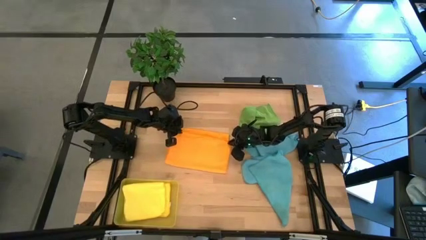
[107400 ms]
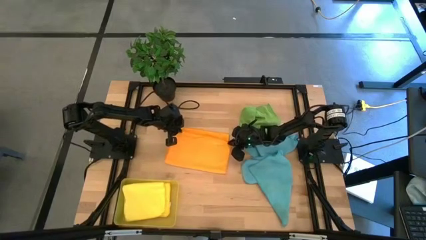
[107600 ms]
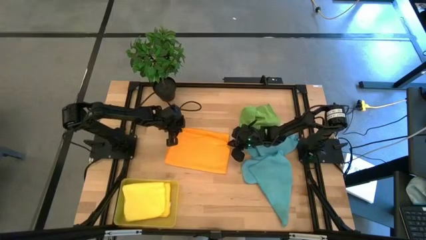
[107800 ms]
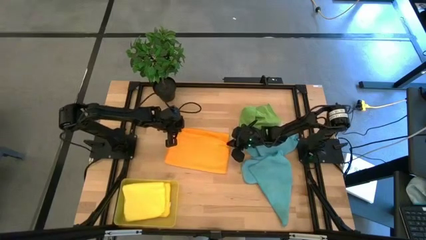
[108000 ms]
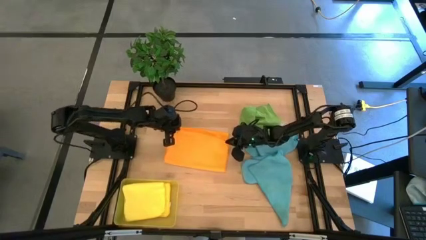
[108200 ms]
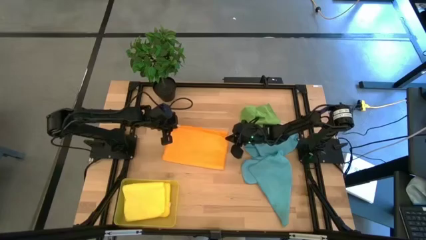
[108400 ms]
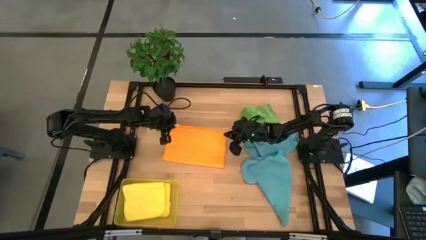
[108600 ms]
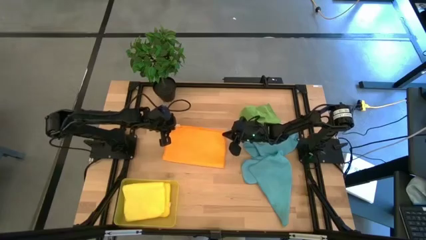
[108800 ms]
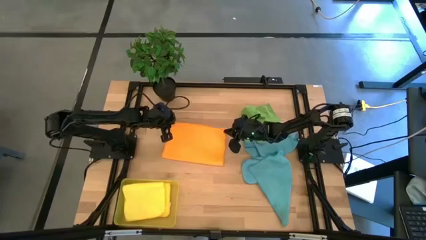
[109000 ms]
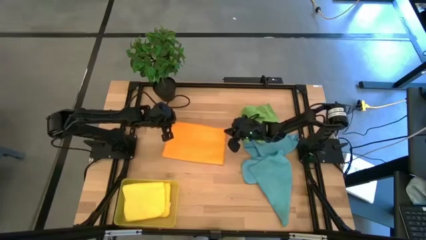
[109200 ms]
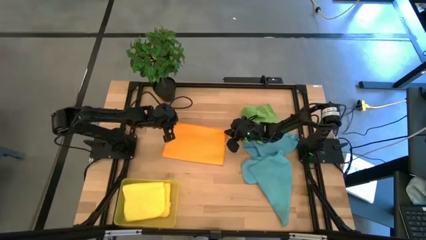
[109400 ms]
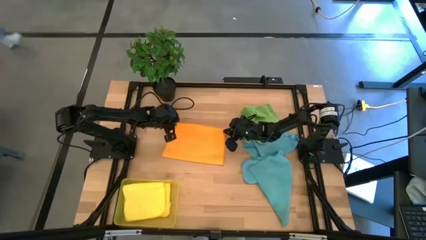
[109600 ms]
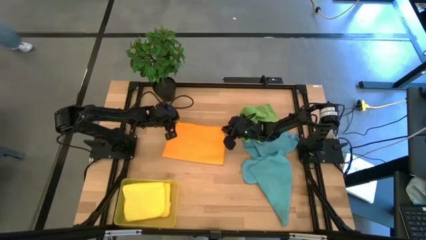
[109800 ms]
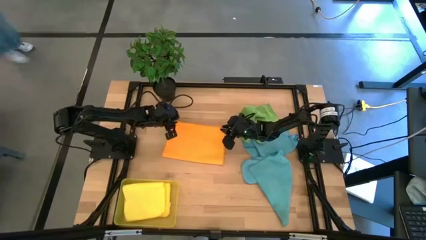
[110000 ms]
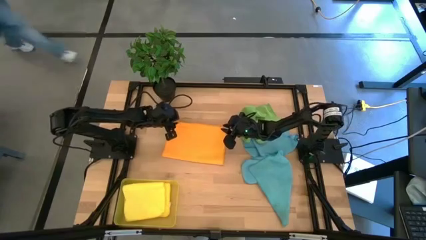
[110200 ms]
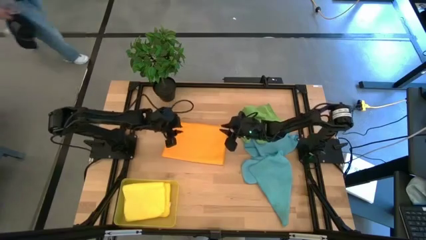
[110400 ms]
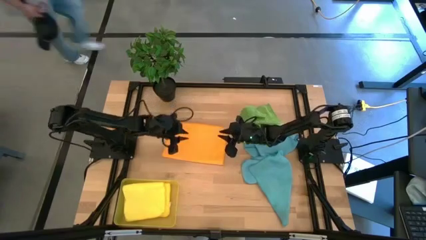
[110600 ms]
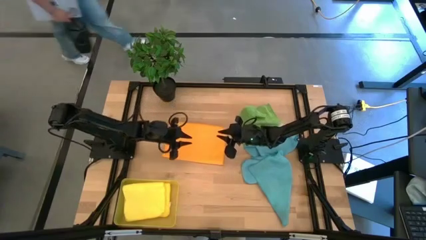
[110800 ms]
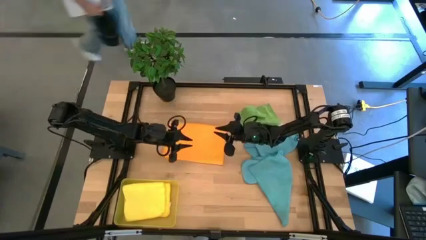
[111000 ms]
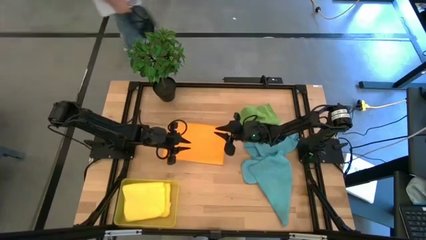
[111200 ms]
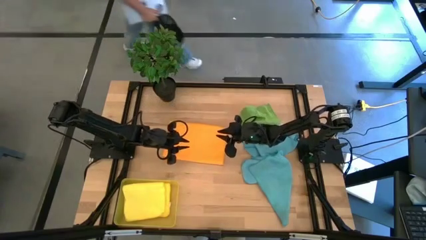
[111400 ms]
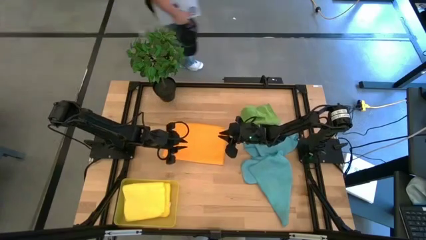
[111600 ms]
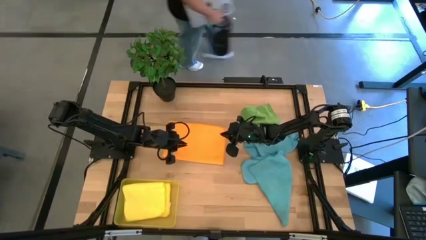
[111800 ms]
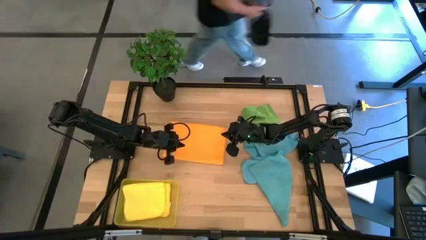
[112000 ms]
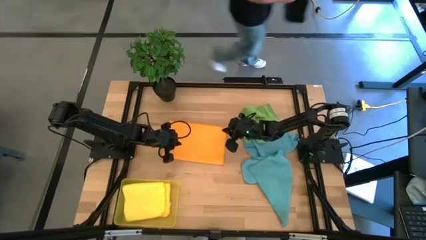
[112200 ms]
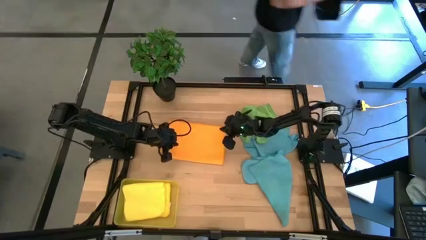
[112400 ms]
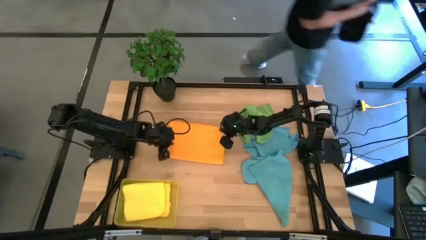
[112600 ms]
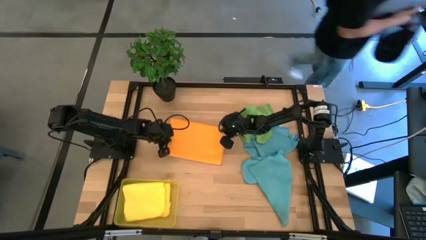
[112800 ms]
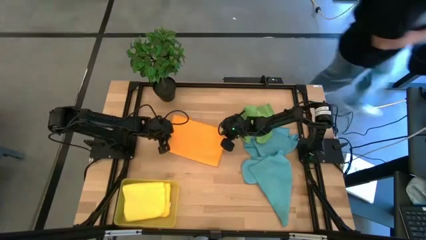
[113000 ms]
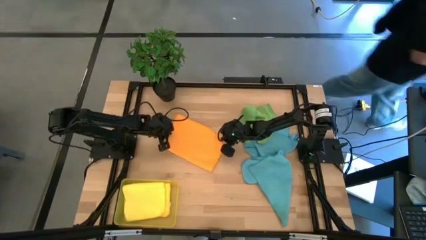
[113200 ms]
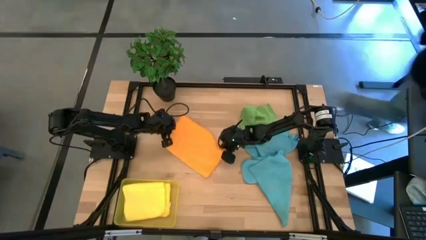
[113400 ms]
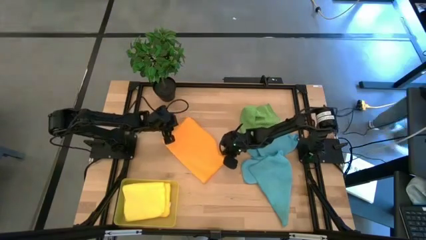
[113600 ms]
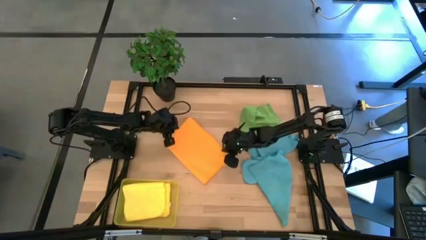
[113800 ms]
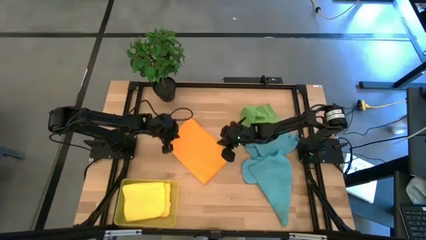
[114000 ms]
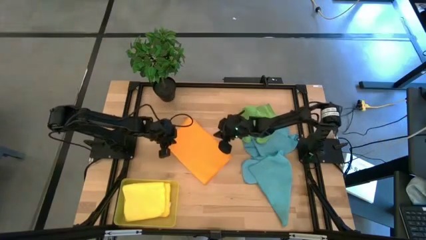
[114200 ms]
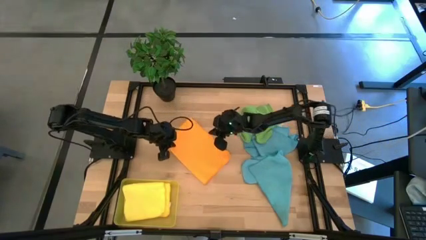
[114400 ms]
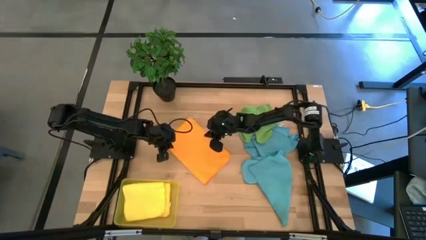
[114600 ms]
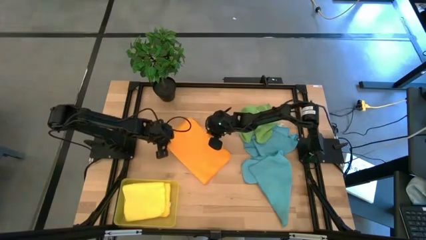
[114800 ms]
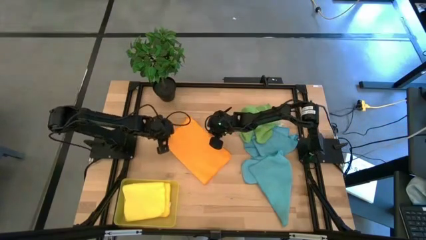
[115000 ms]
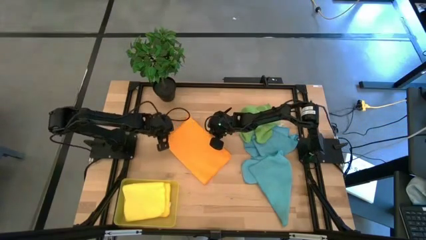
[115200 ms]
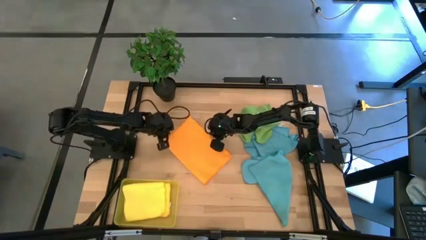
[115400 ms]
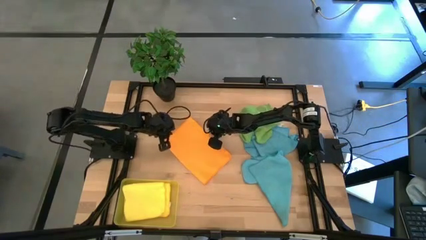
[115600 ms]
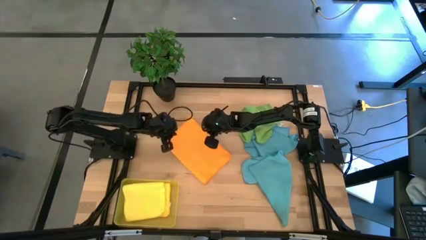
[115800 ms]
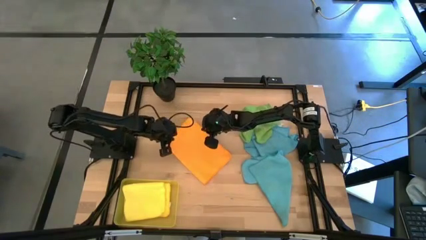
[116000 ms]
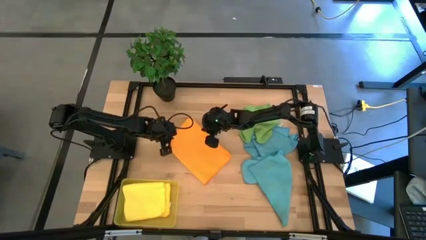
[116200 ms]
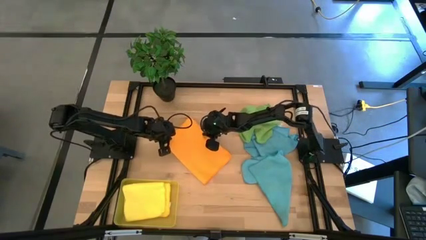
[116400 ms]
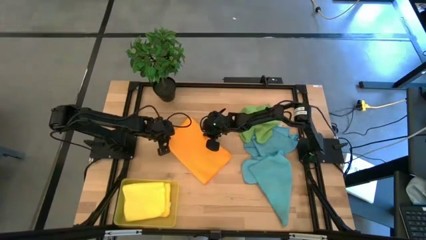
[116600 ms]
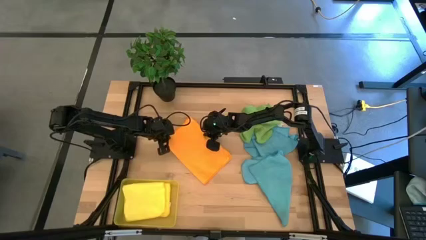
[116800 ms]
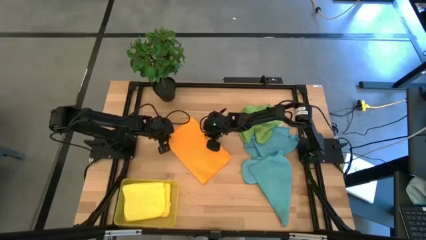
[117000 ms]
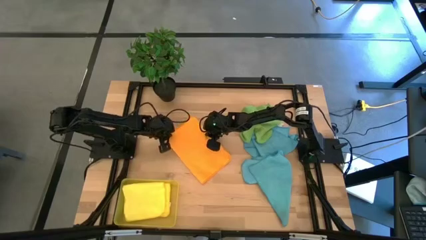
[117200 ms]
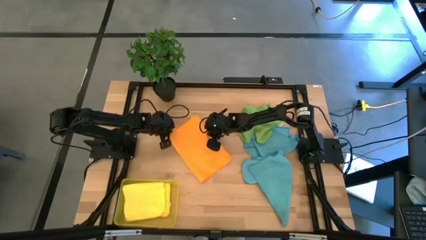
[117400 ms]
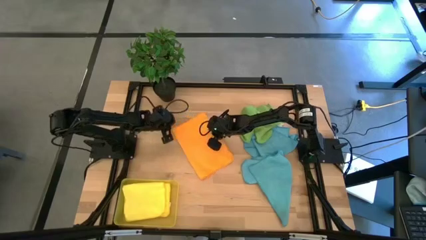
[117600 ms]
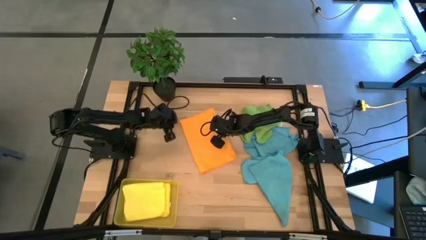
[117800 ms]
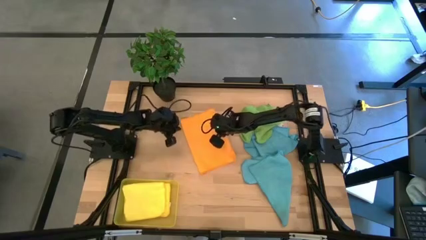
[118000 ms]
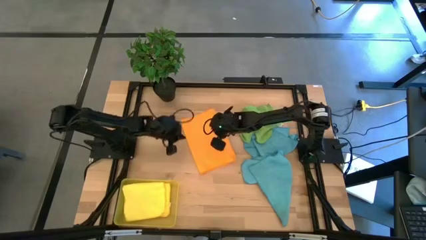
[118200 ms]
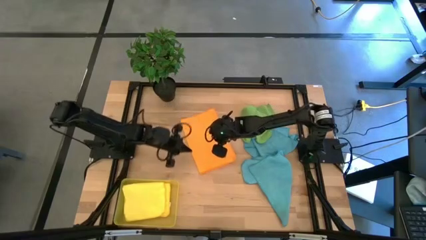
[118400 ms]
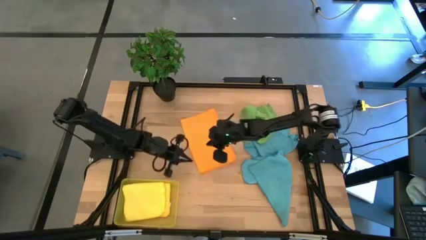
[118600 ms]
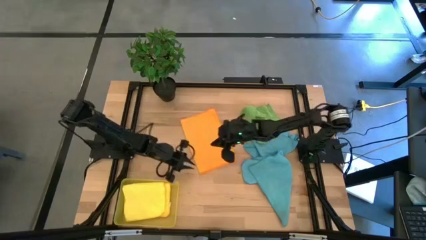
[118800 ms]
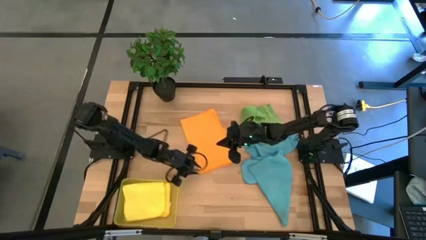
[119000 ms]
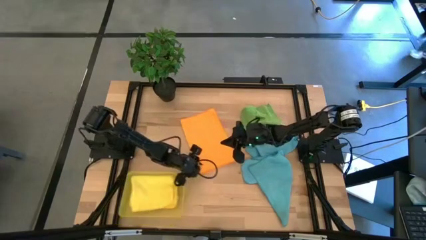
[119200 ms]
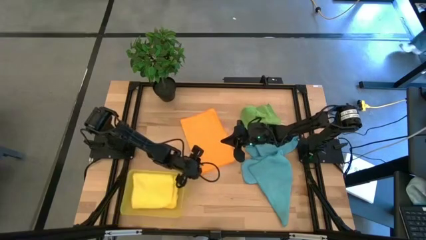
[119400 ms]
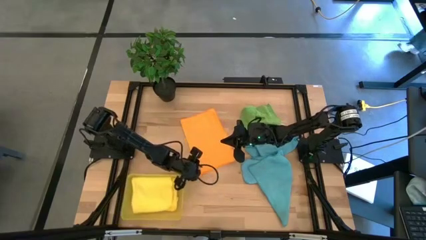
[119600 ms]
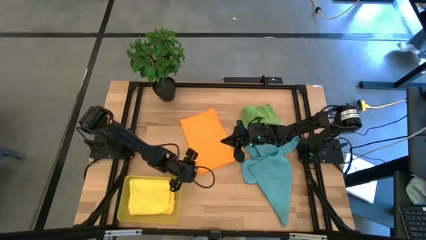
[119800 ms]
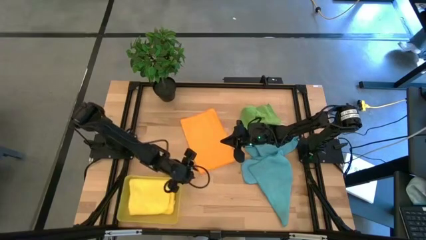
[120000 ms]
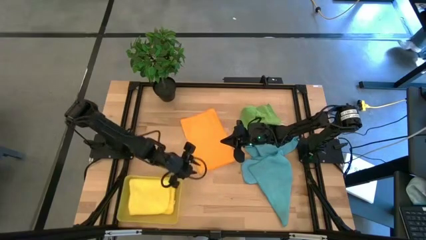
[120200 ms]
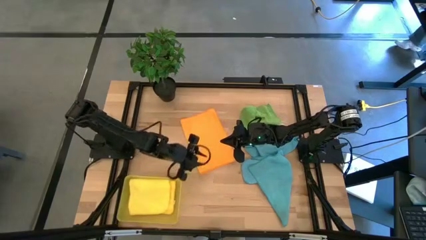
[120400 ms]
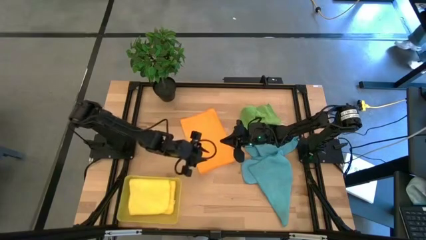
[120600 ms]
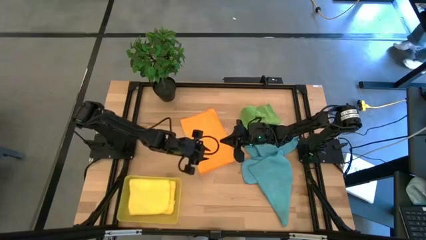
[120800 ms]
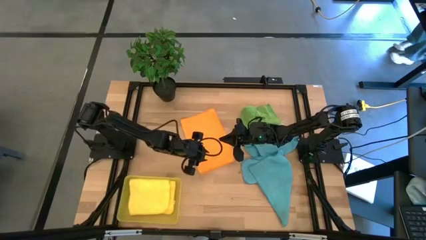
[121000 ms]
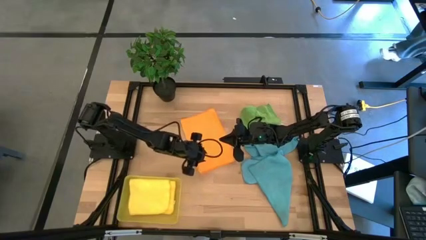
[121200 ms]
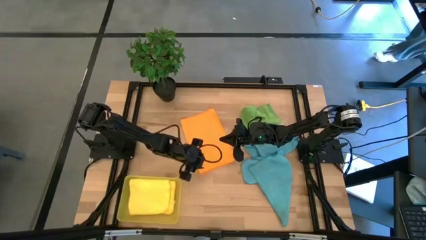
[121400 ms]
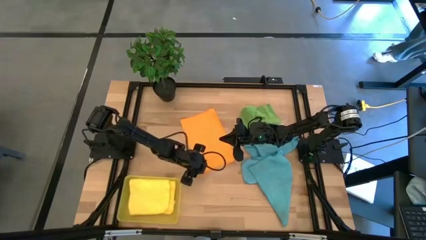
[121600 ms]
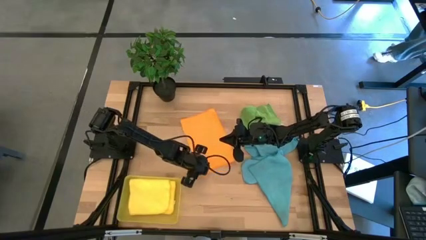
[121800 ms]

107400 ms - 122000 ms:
Task: Fold microfiber towels
Fold the orange microfiber cloth
